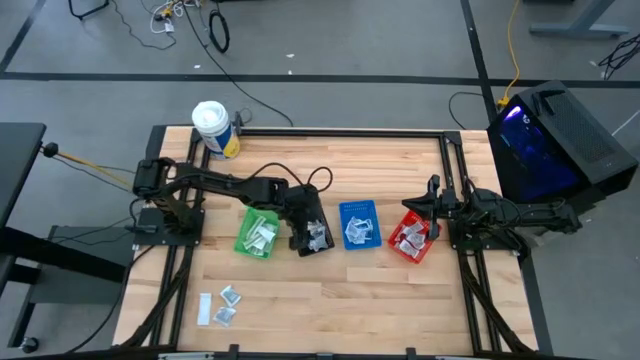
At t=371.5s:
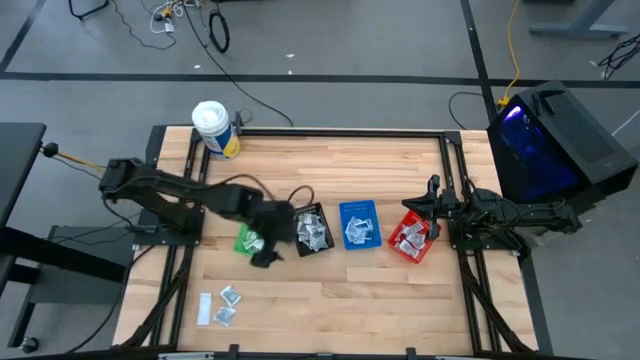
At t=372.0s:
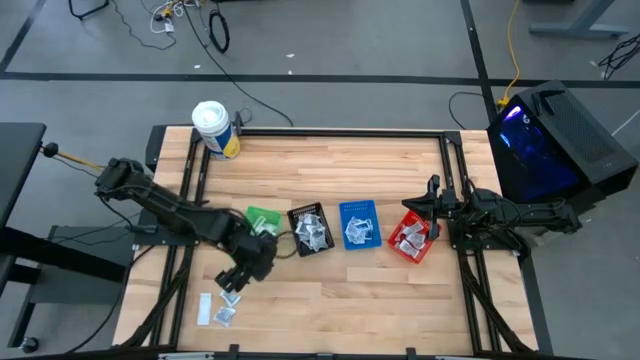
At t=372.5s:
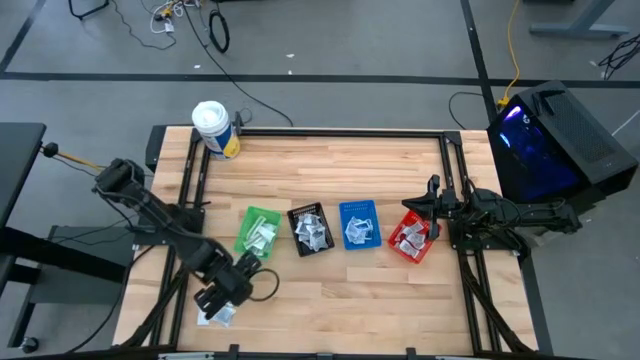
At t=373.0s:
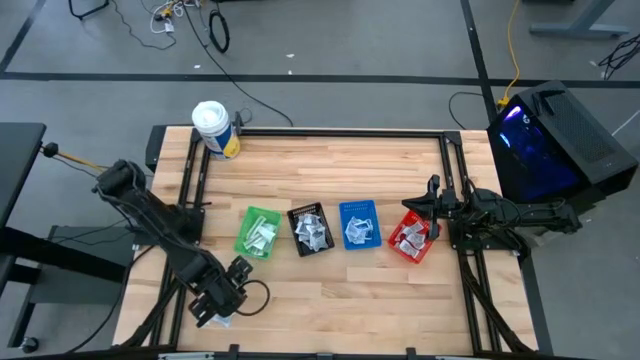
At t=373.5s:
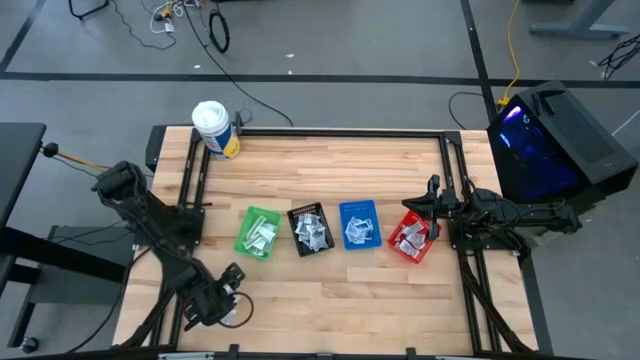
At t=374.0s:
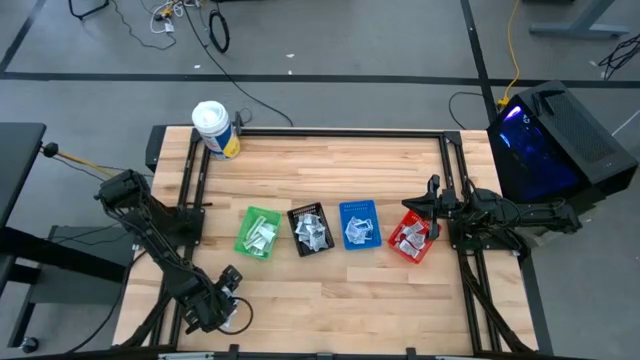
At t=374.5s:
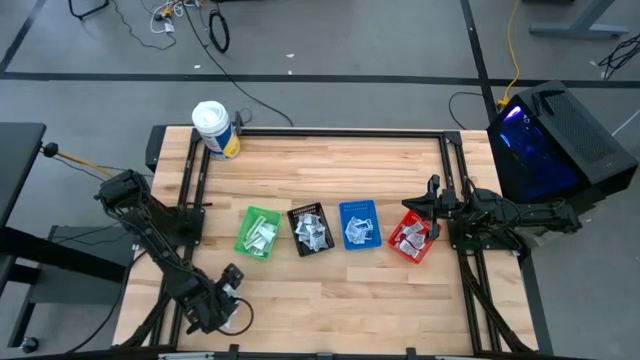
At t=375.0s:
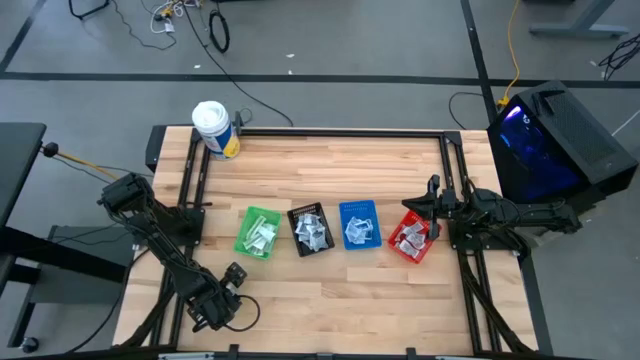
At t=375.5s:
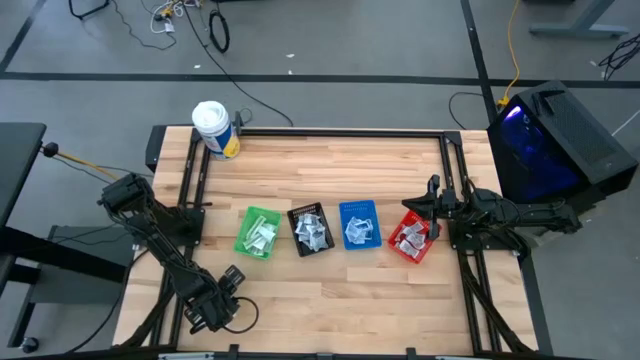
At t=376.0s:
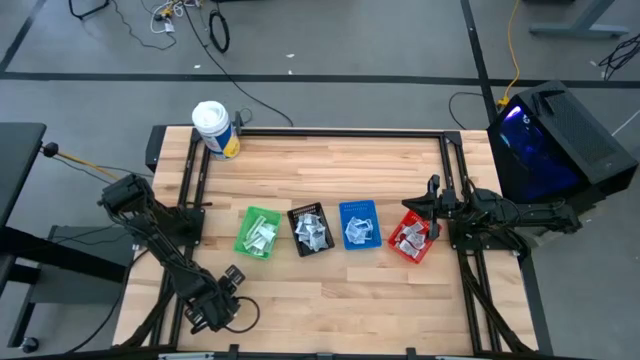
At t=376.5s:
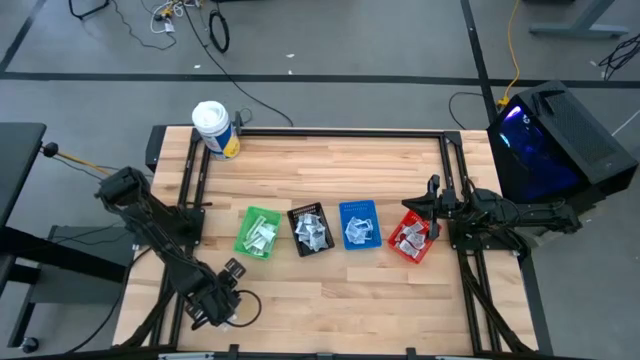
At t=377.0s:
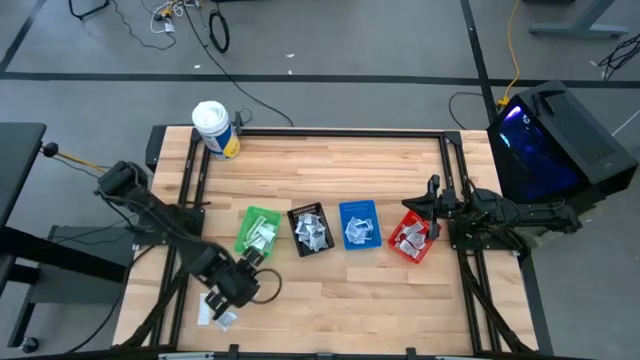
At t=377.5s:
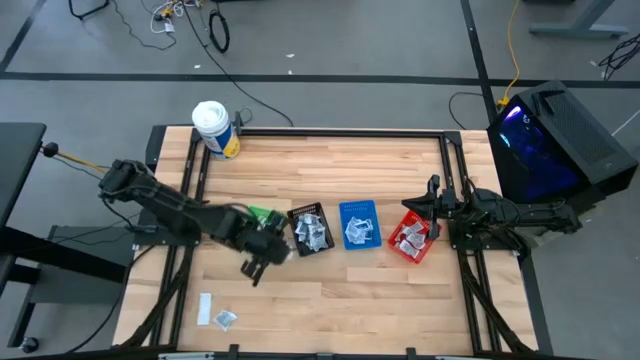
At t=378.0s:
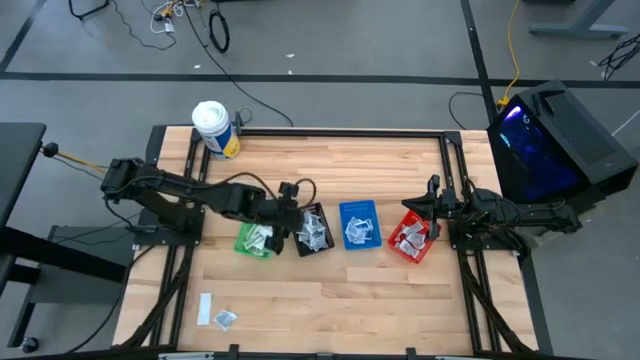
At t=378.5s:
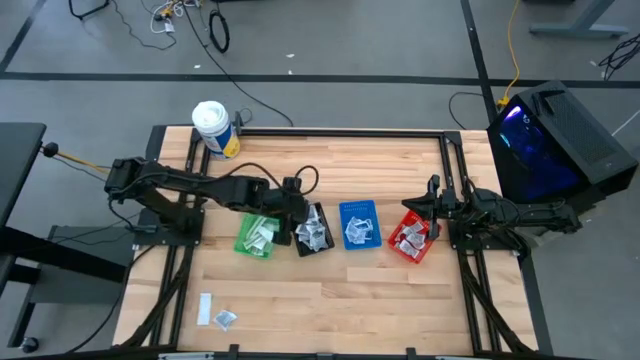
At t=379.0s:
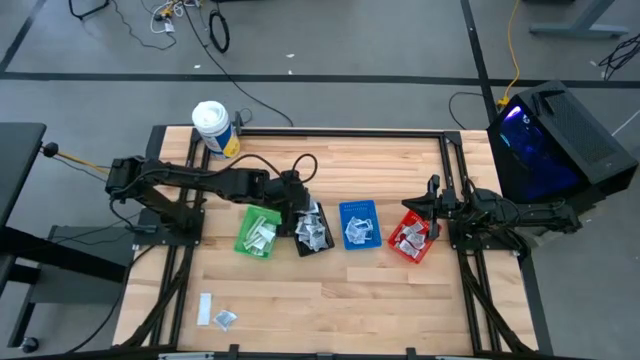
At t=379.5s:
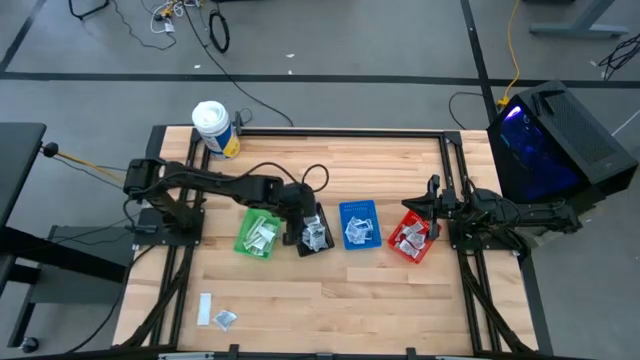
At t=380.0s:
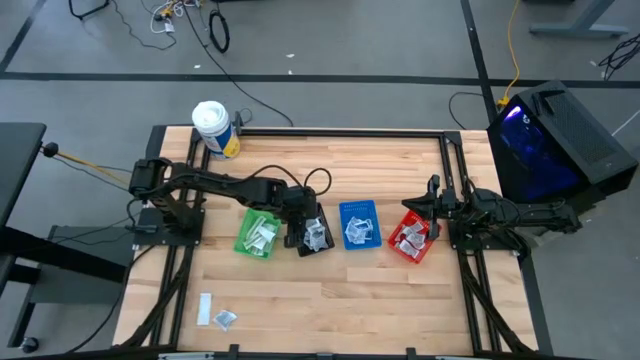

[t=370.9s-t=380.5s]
Task: Pick & Place First Aid Supplies
Put the towelette pack into the black basket

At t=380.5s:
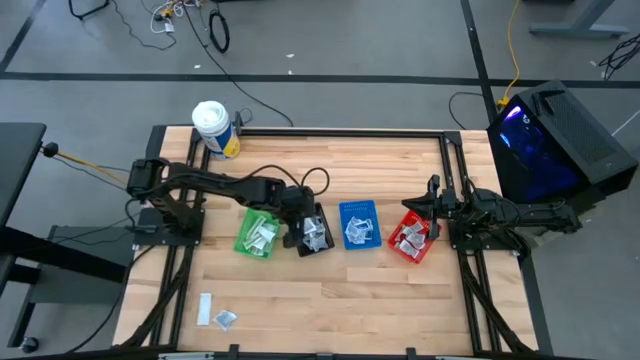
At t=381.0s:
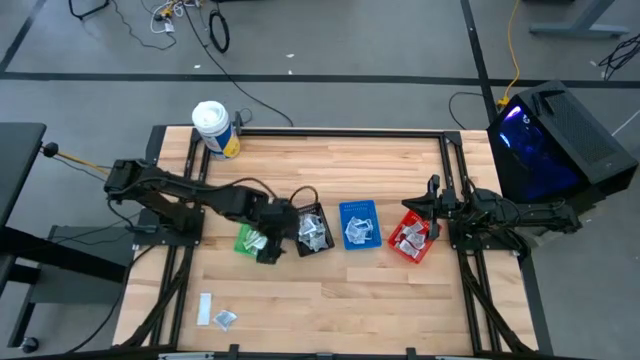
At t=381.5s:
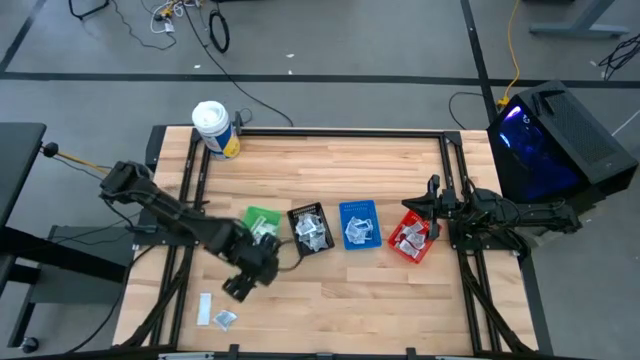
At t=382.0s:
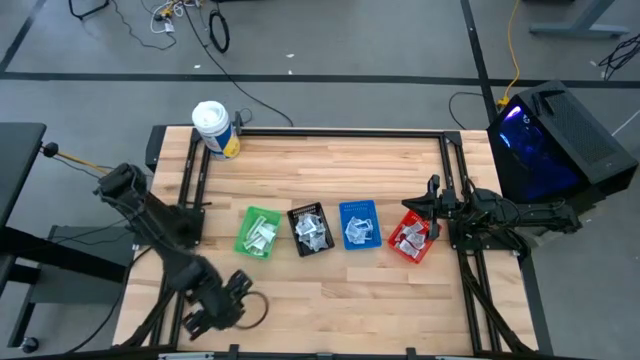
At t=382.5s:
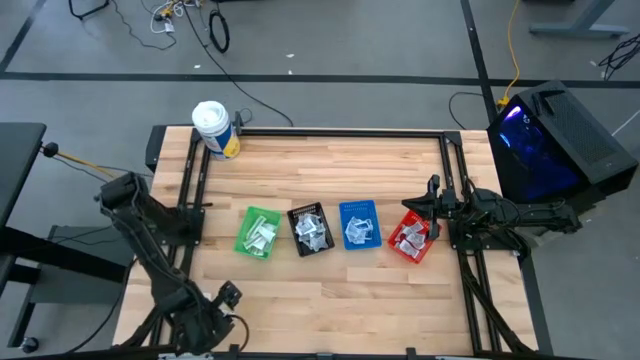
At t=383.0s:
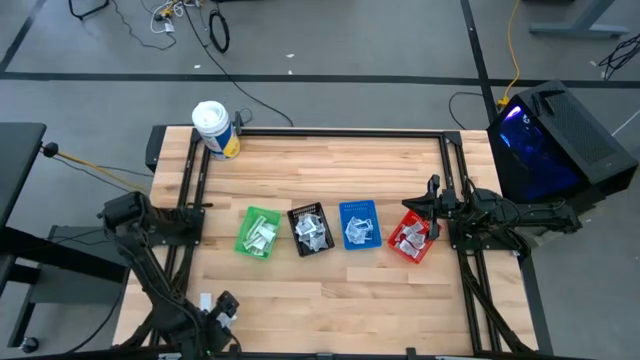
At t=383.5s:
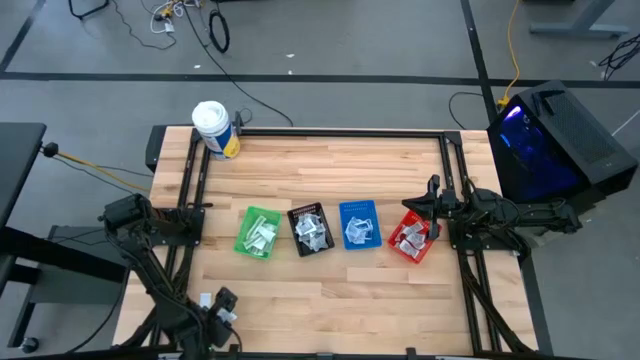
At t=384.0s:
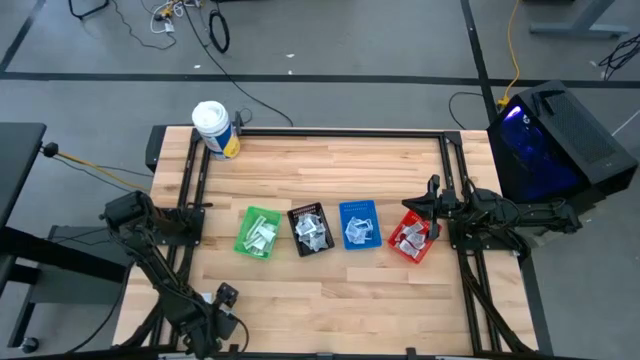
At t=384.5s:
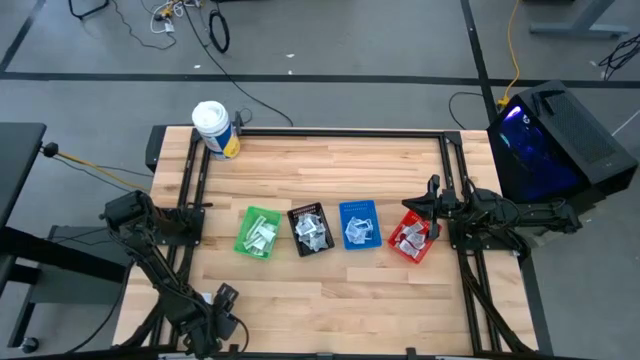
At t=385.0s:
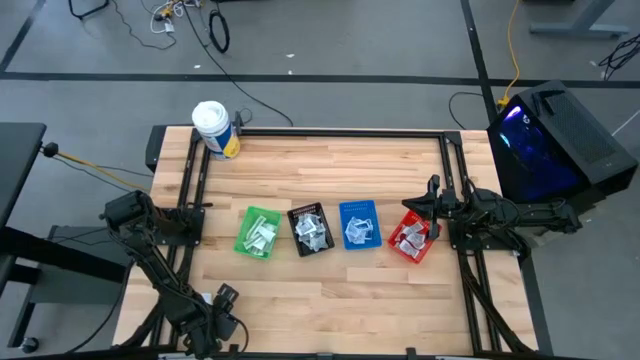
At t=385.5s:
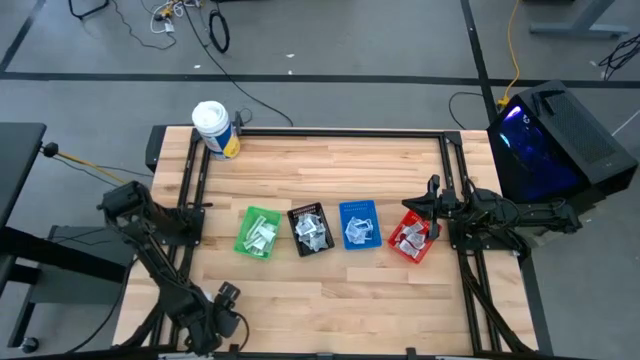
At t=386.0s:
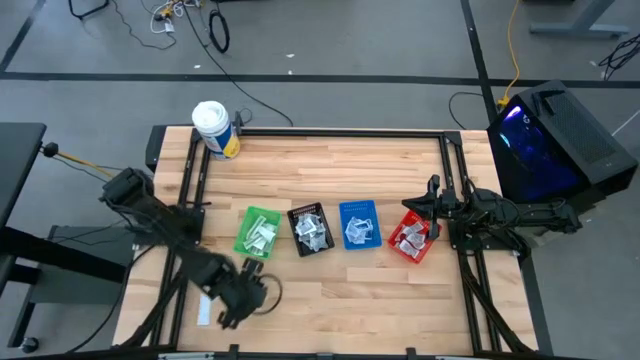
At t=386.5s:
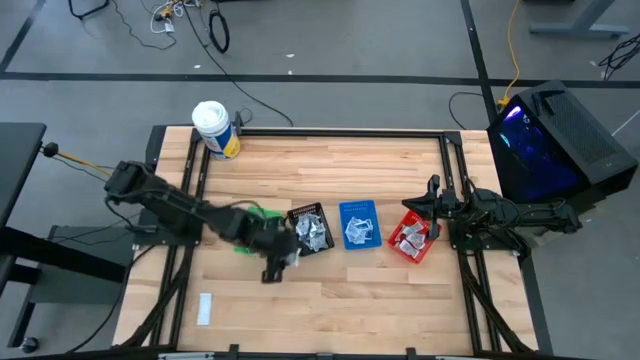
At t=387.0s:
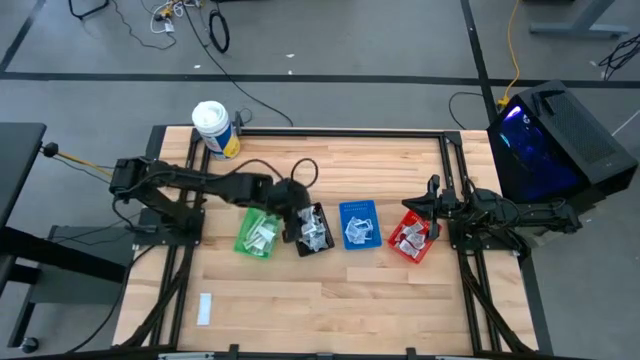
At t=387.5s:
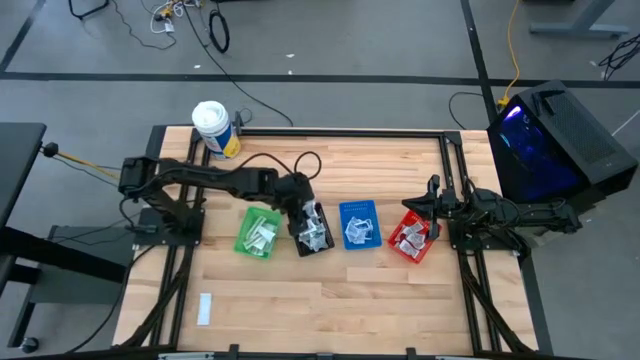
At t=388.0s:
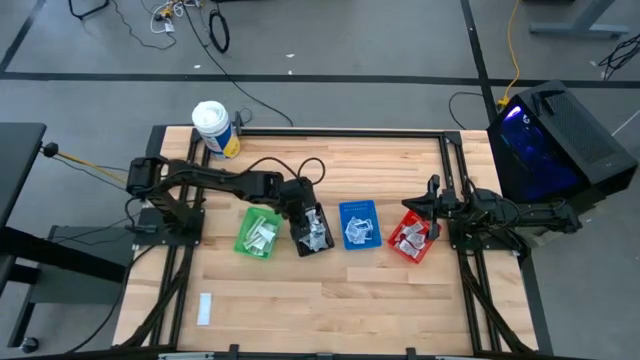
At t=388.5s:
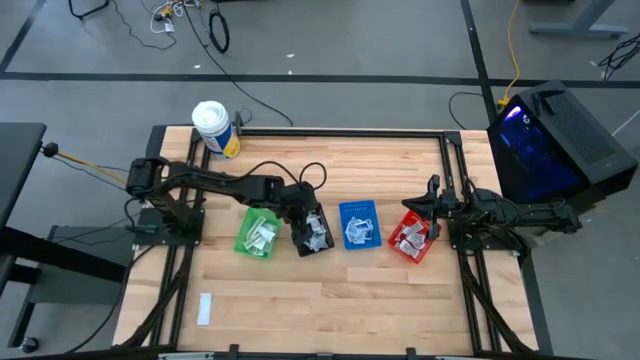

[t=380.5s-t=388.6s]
Put the towelette pack into the black basket
